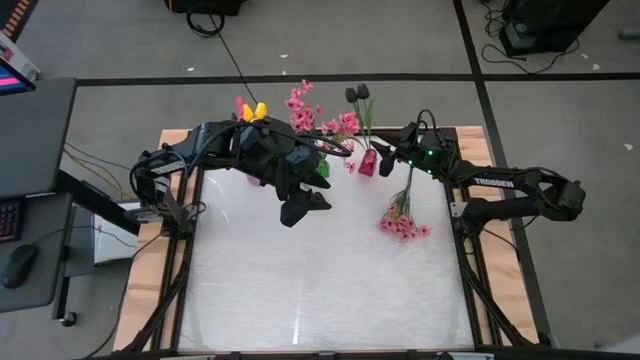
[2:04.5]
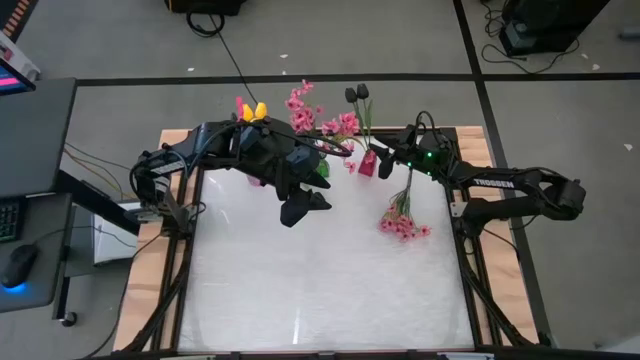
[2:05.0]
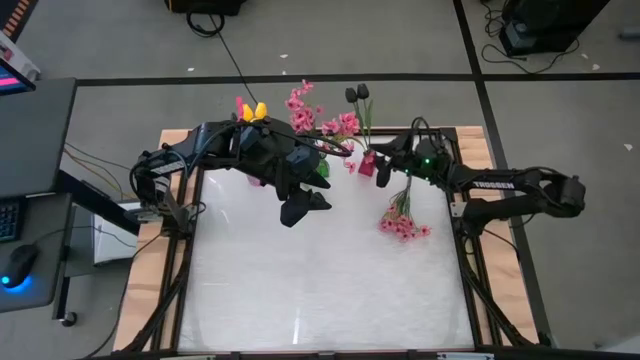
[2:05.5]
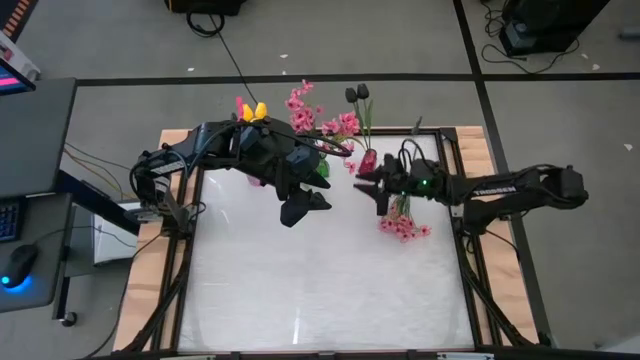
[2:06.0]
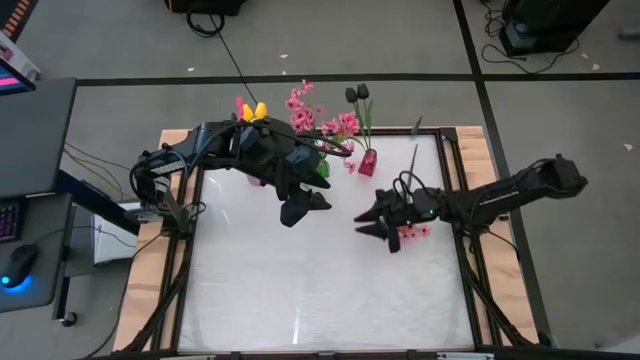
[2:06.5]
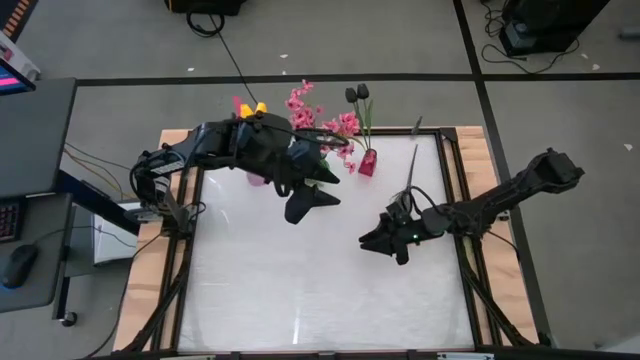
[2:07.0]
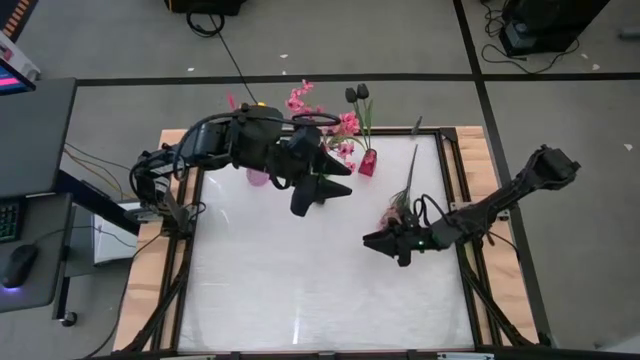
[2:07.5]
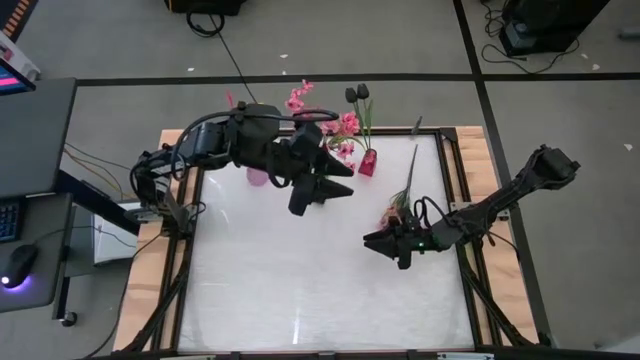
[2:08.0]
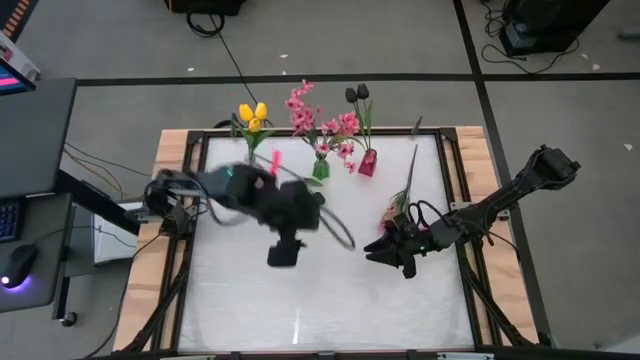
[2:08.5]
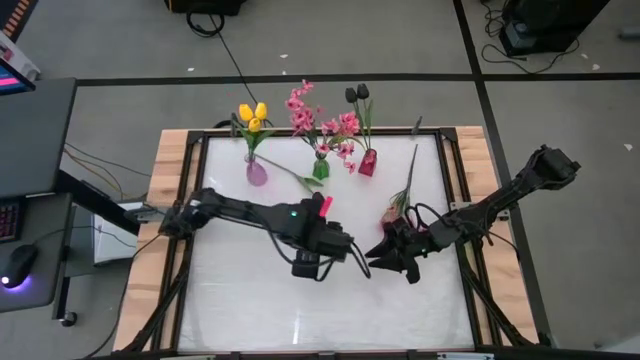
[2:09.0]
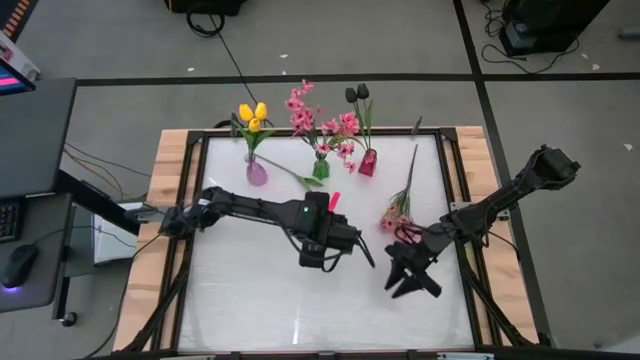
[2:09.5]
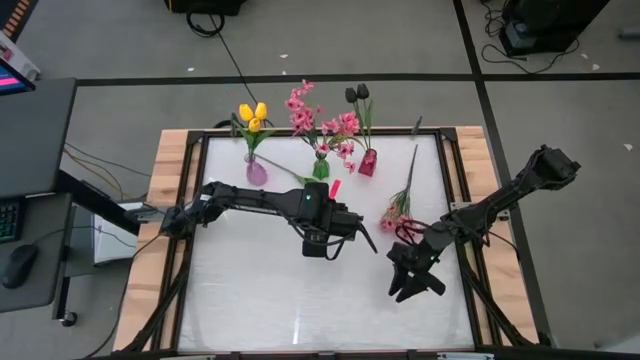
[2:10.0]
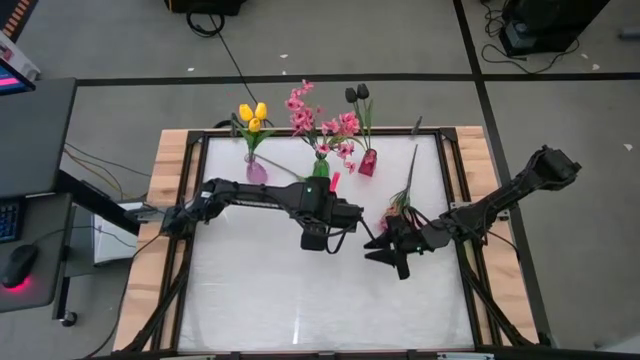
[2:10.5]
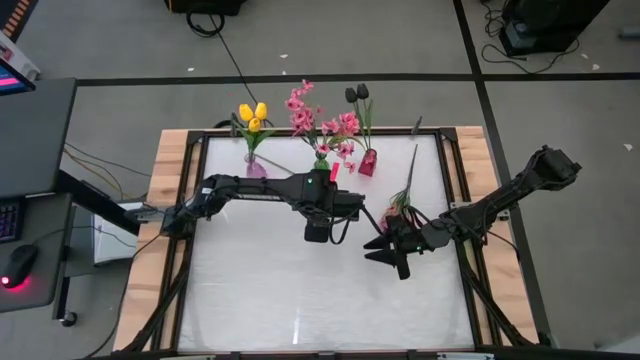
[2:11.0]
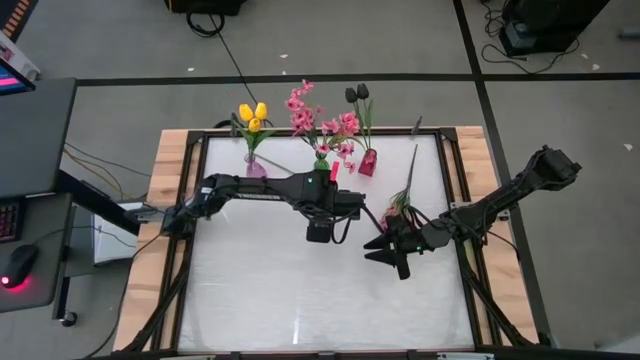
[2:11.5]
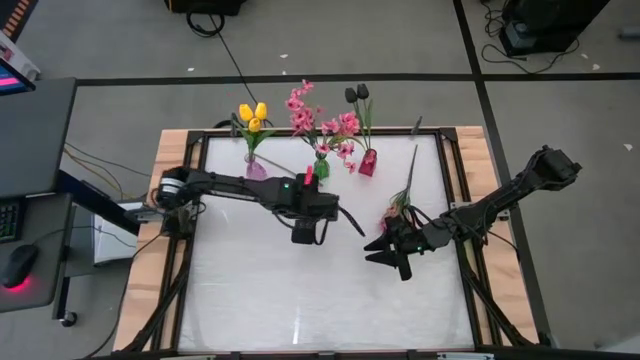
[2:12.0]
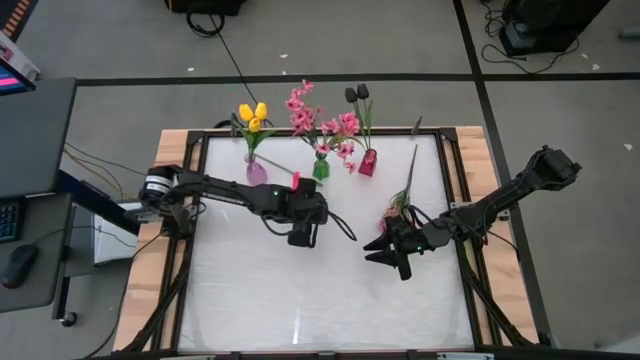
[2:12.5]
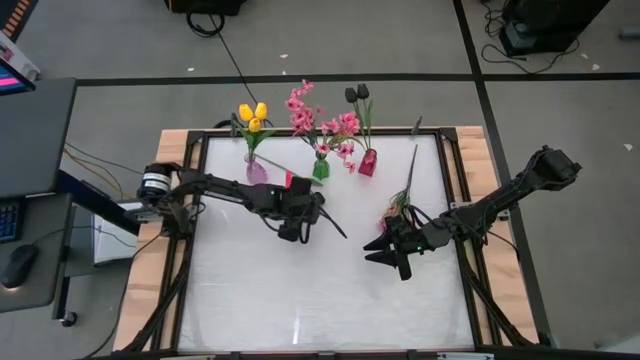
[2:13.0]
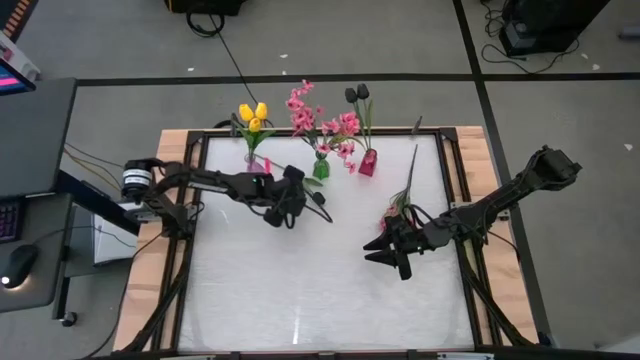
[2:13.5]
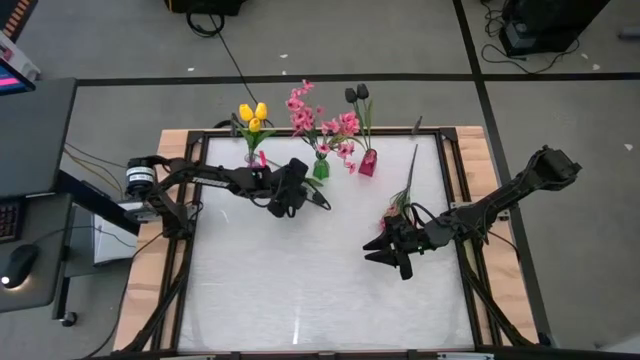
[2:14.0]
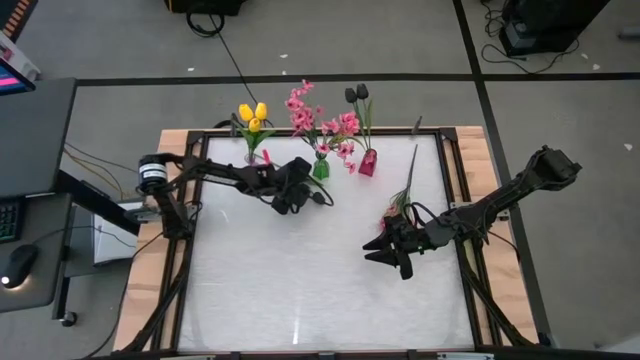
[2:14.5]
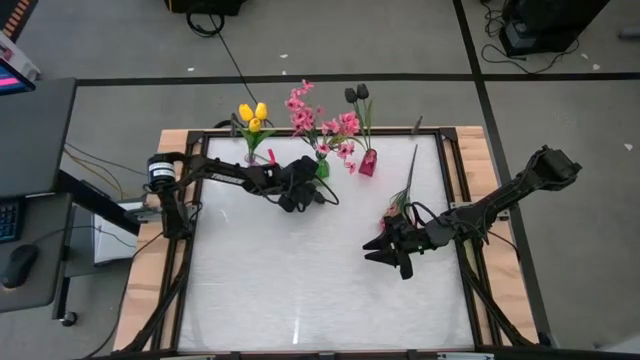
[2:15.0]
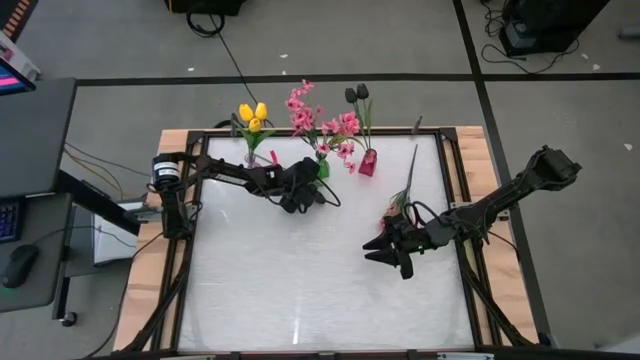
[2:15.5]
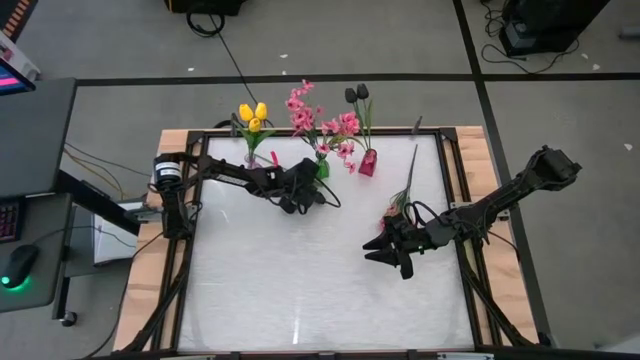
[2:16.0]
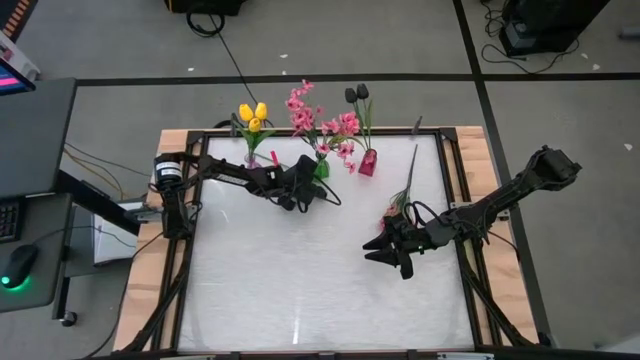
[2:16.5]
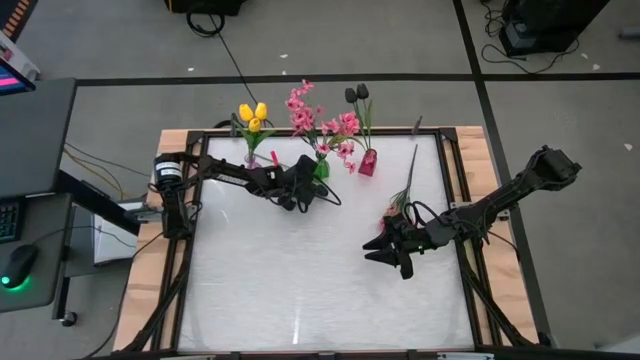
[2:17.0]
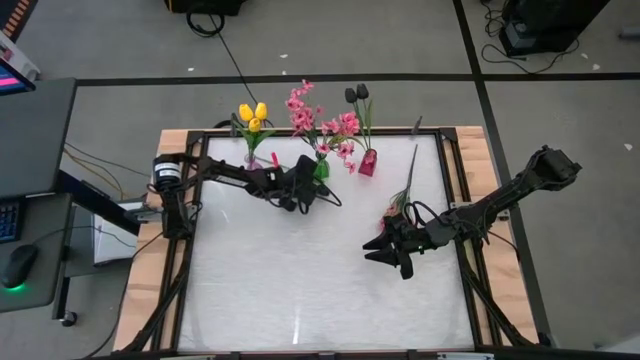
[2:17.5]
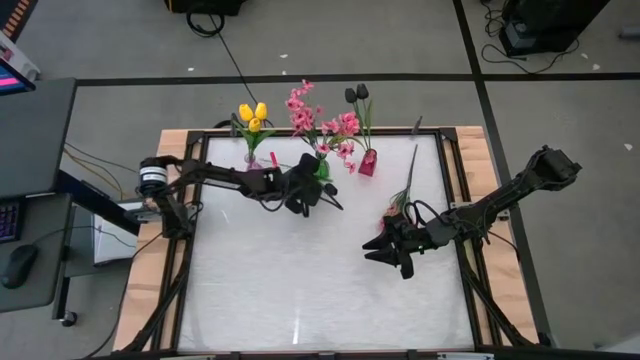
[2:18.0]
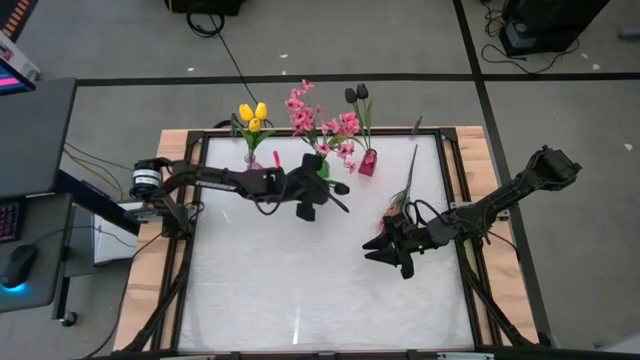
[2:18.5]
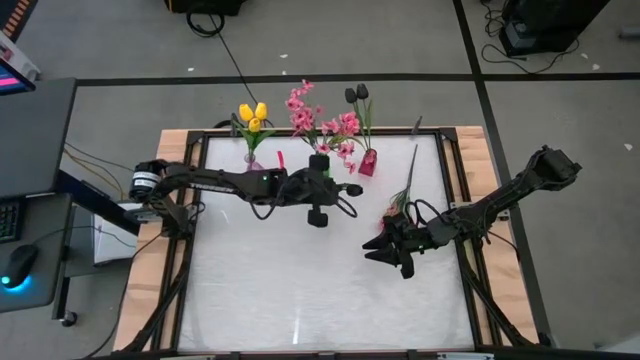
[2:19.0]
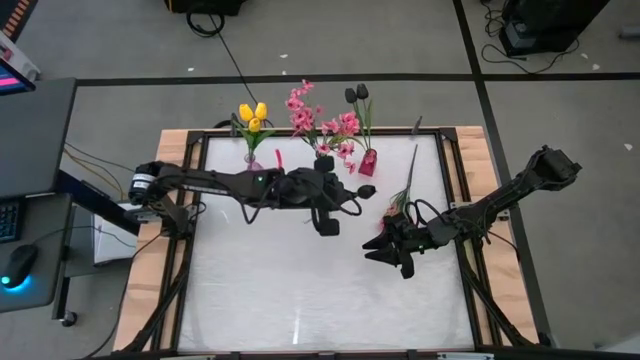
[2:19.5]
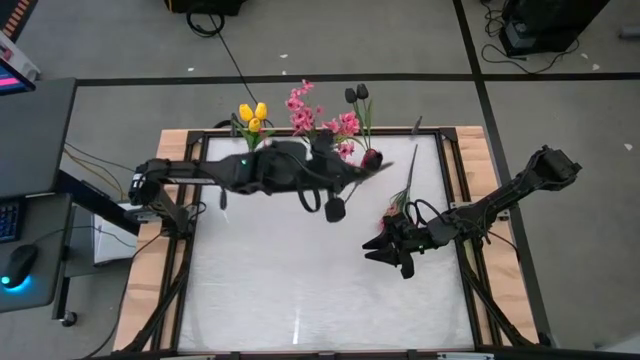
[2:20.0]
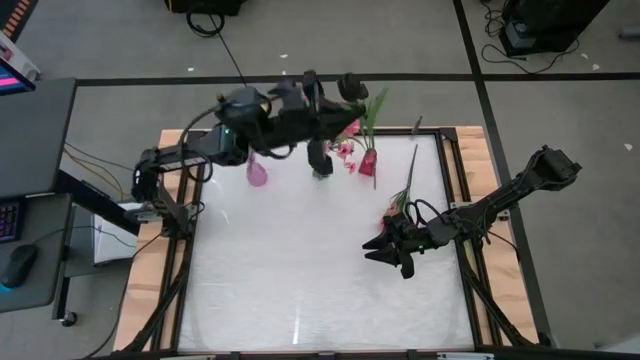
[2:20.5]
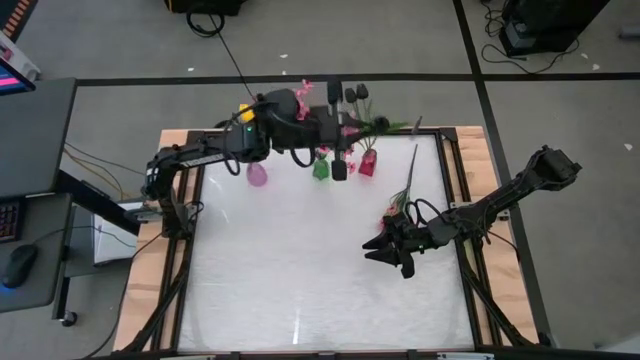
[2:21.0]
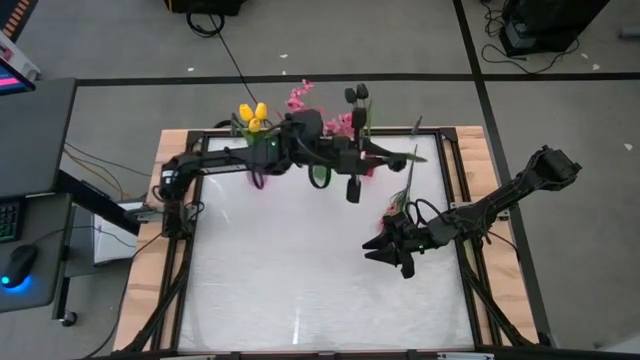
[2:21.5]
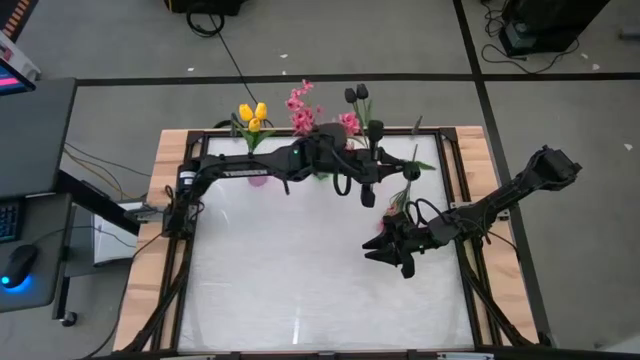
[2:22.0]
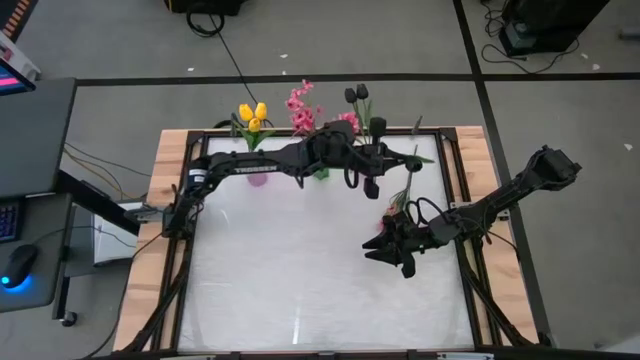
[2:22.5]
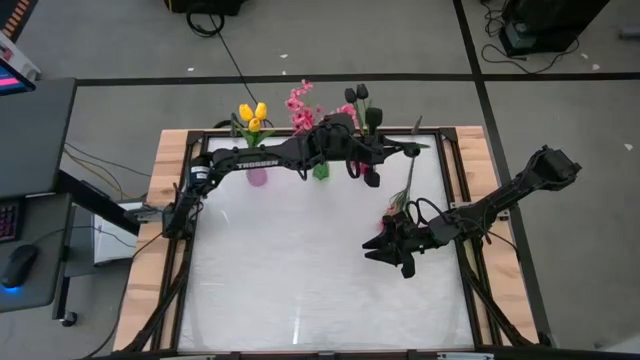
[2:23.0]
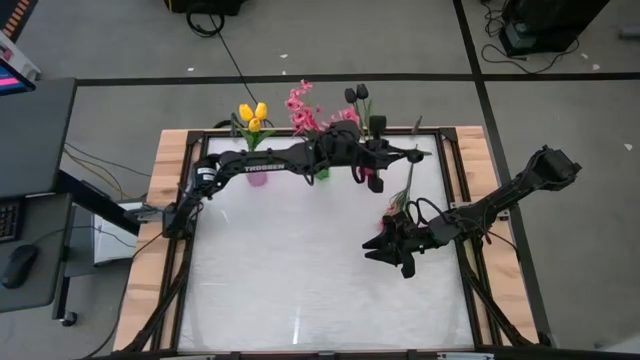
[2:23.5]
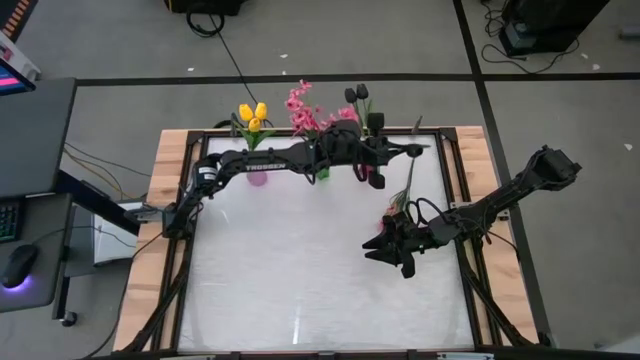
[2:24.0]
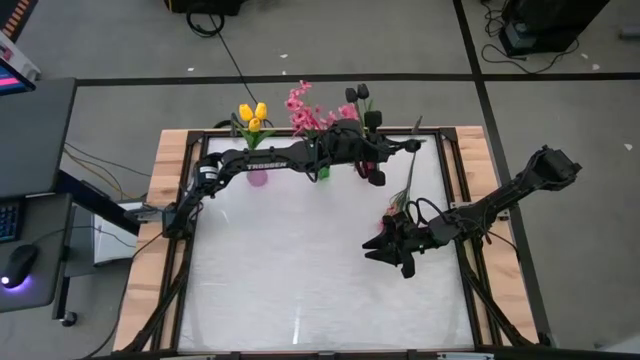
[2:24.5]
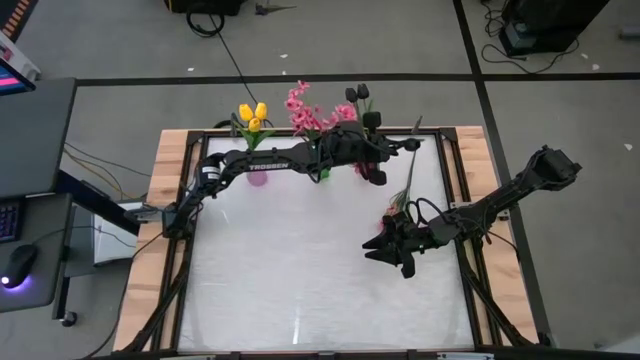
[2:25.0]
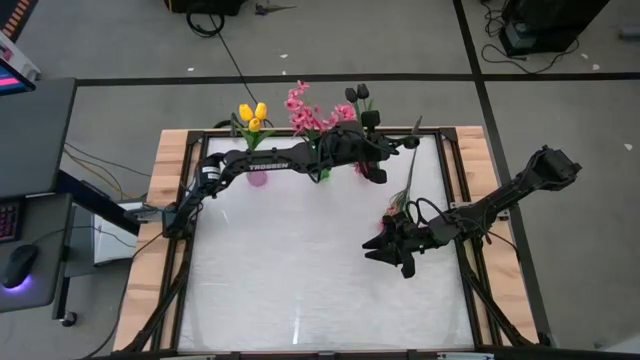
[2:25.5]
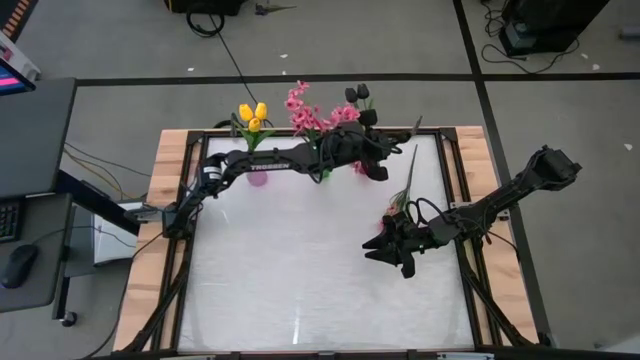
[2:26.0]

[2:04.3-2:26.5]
Task: Sort flowers into vase by color
Put the black flower into the red vase
